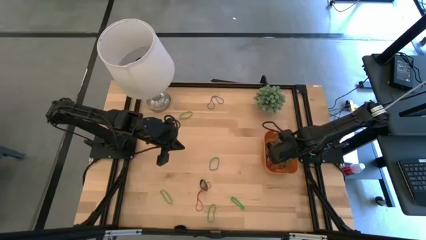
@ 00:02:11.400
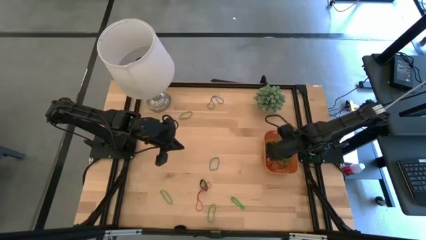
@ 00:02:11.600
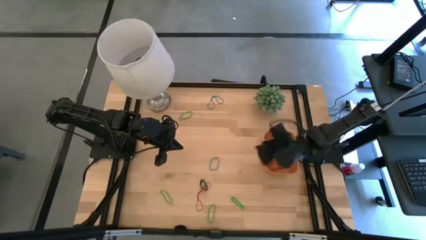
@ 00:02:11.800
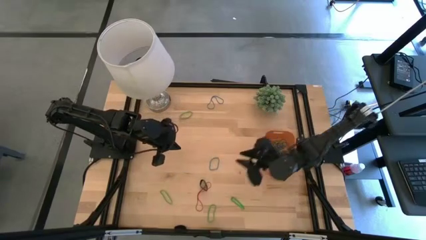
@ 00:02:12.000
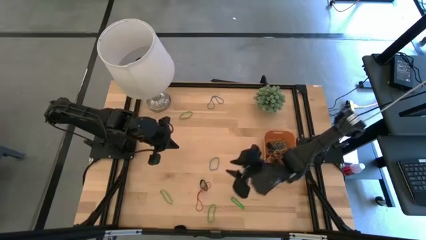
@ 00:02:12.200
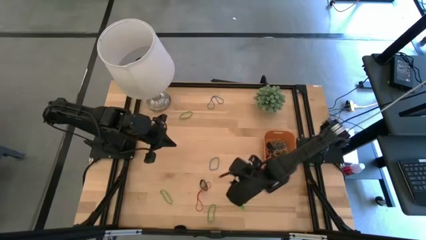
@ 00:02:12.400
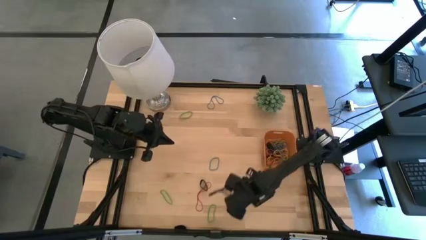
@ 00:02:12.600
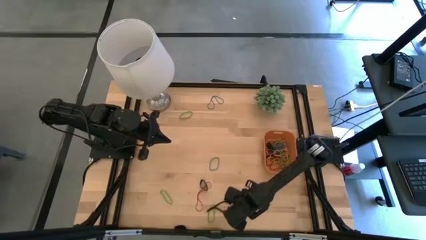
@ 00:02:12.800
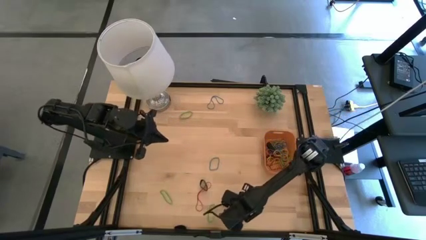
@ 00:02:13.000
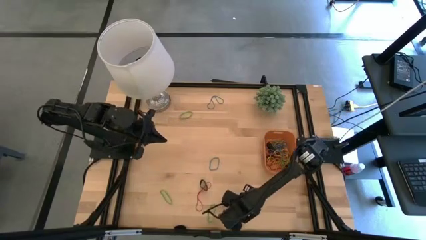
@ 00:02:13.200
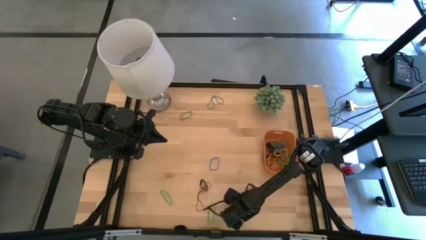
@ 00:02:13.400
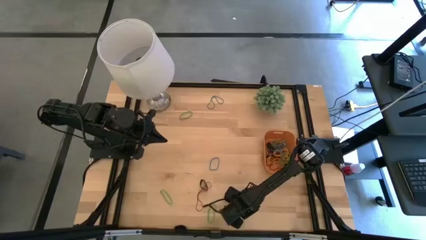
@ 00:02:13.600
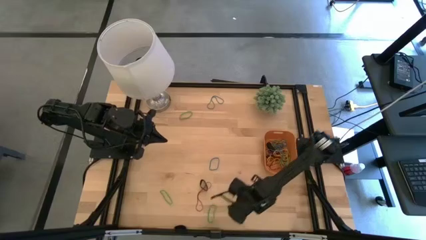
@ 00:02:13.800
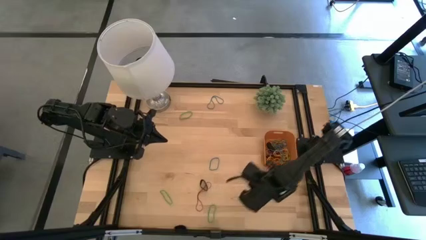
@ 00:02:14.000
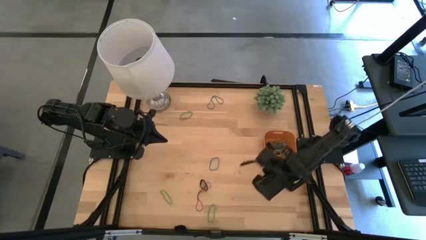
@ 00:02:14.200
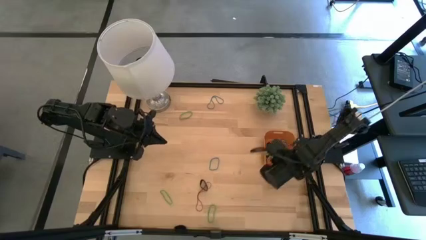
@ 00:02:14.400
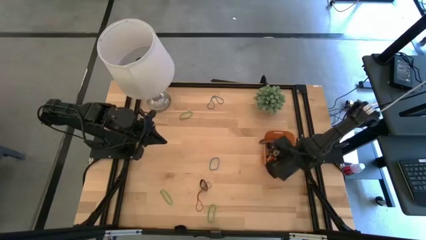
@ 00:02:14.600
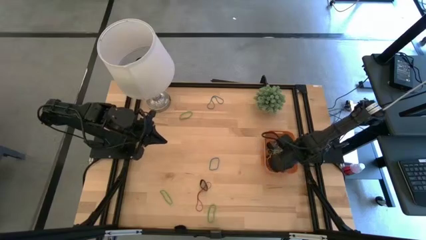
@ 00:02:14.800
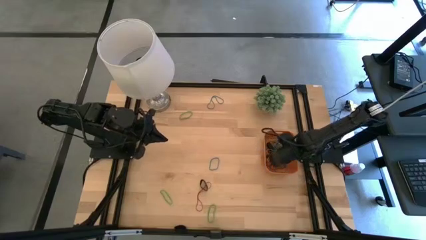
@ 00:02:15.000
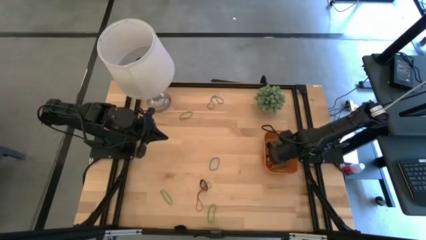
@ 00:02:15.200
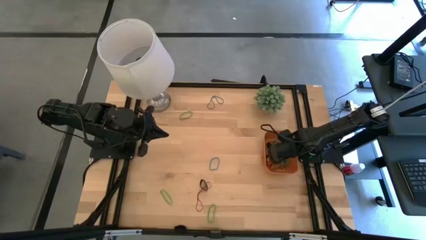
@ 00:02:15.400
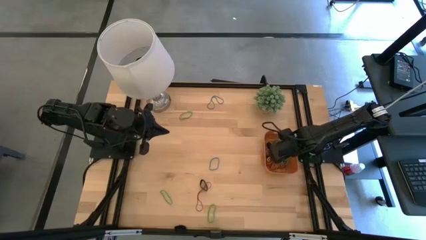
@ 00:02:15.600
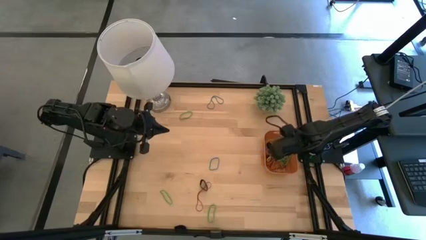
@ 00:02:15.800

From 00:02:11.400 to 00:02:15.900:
Task: Pick and place rubber bands into bin
Put the green rubber band into the orange bin

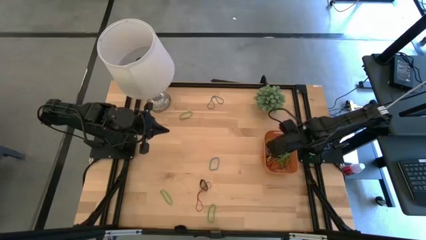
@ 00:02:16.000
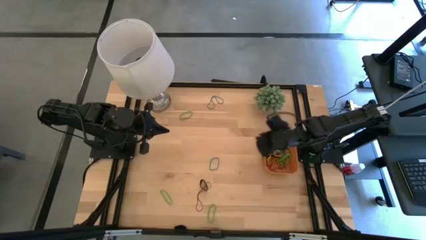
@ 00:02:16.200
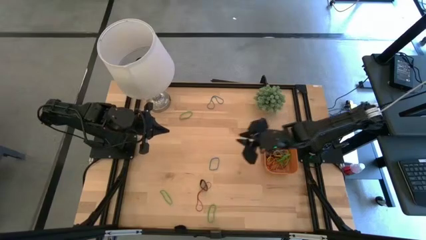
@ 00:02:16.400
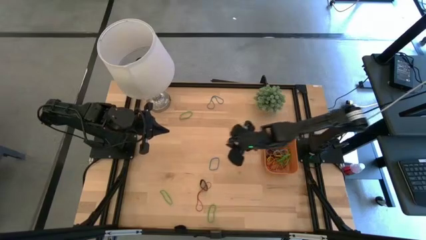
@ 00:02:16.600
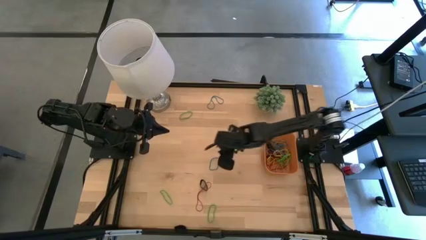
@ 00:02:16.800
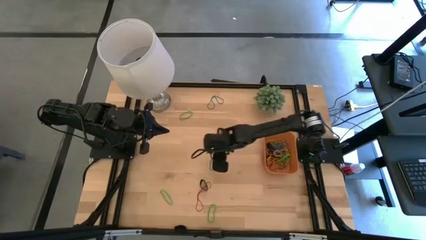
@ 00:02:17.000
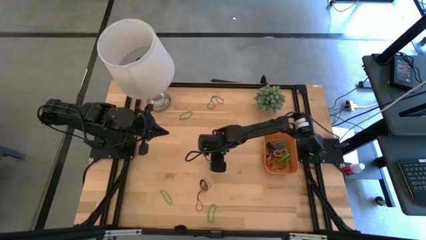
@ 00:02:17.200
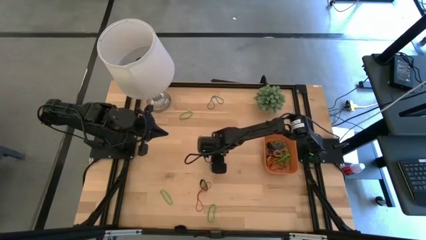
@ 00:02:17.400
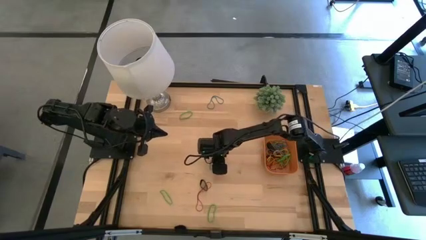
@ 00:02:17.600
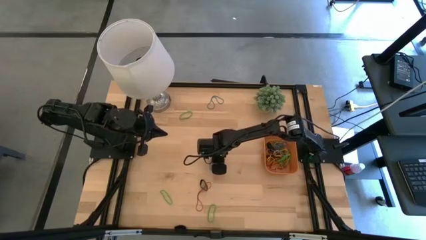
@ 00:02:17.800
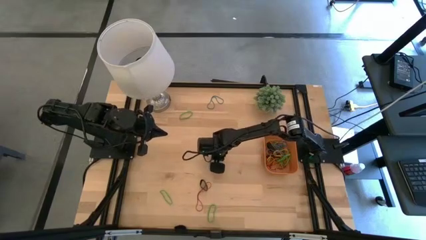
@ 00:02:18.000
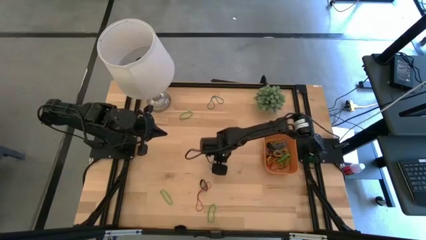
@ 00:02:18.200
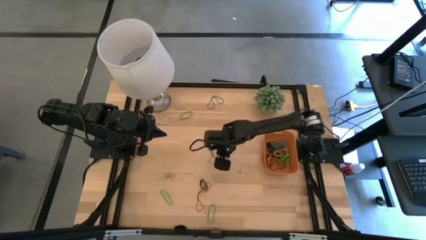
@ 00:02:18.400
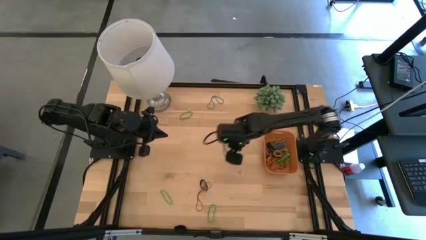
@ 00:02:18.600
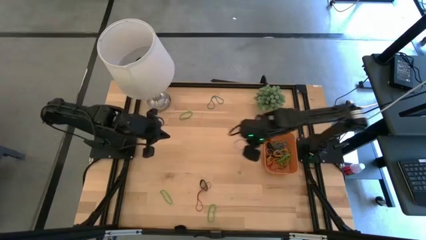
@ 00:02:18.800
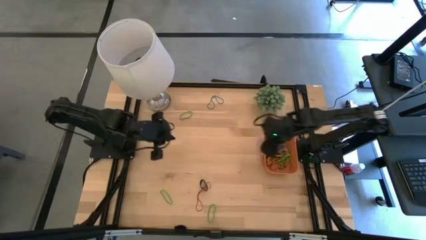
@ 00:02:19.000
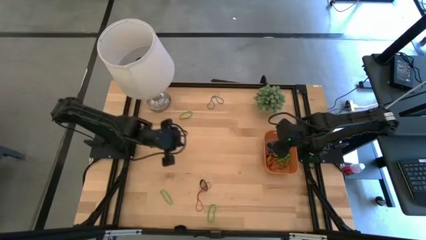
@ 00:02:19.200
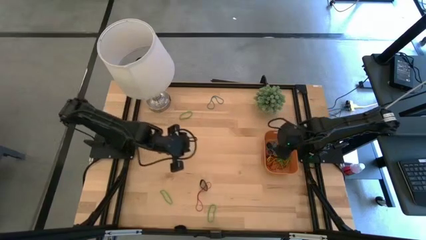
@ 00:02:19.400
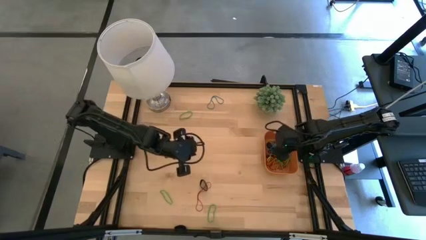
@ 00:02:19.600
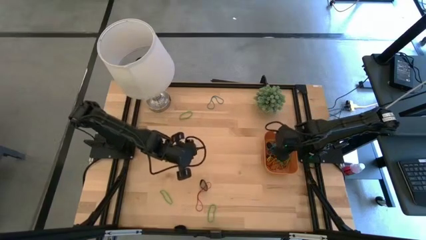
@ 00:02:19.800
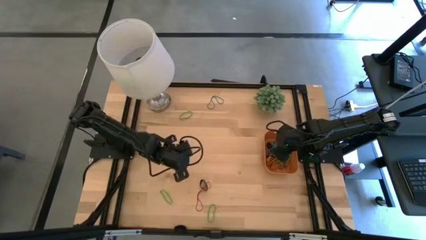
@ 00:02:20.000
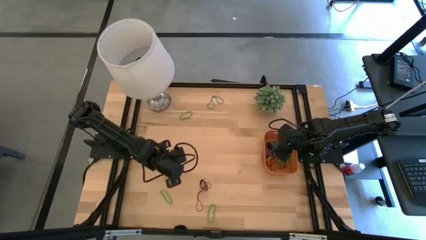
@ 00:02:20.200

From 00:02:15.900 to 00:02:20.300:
Put the blue rubber band into the orange bin

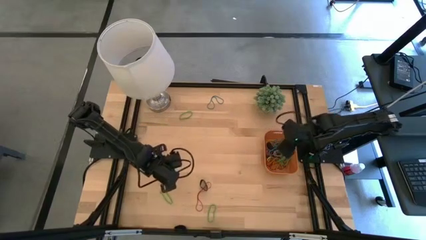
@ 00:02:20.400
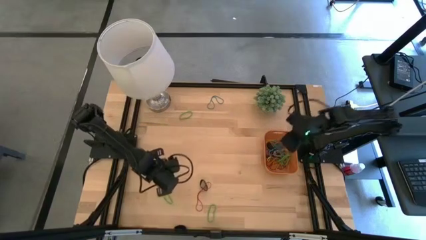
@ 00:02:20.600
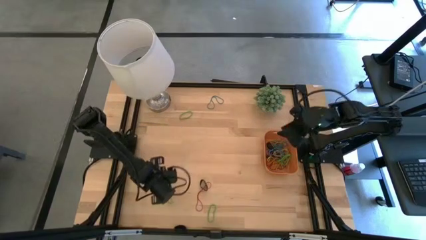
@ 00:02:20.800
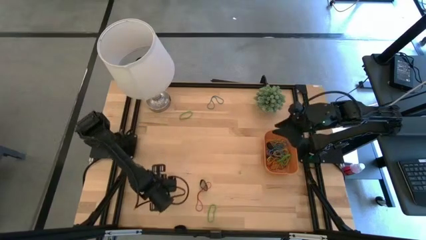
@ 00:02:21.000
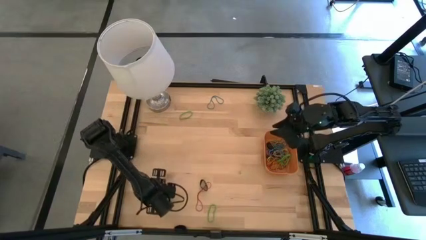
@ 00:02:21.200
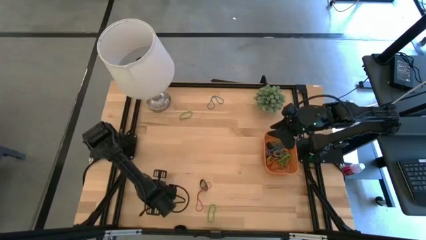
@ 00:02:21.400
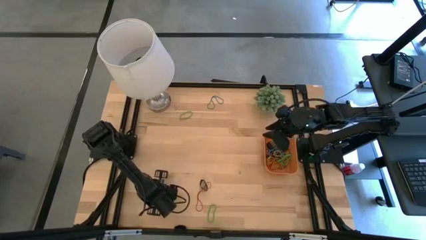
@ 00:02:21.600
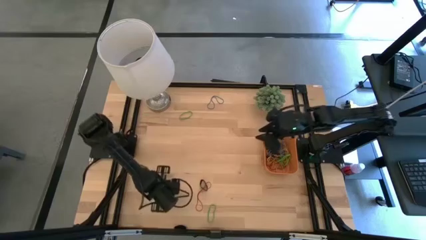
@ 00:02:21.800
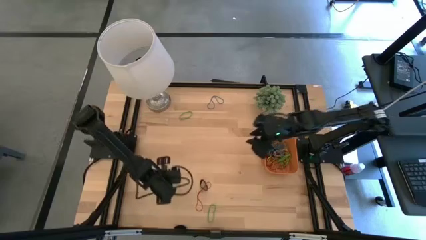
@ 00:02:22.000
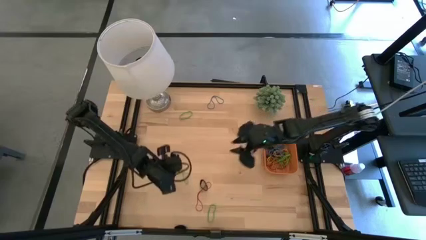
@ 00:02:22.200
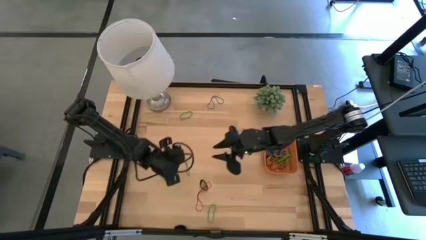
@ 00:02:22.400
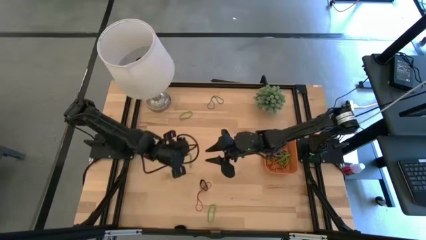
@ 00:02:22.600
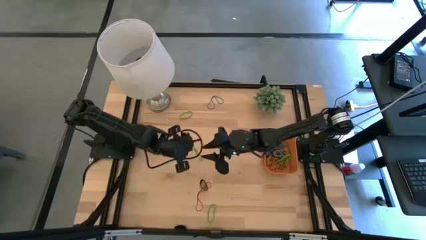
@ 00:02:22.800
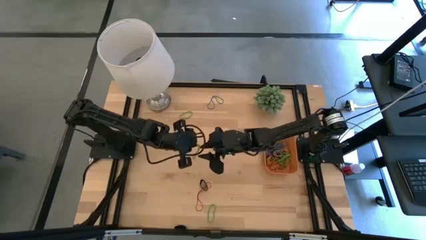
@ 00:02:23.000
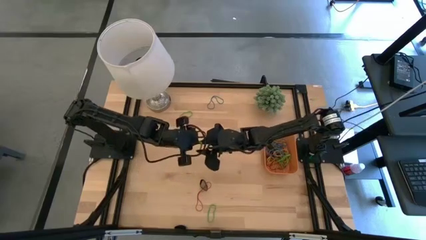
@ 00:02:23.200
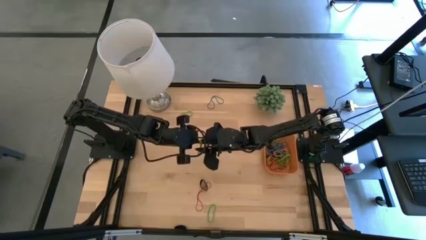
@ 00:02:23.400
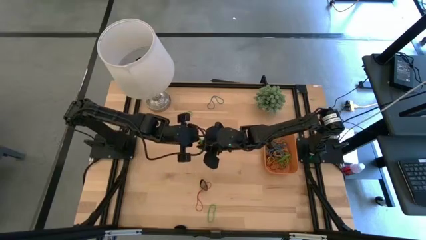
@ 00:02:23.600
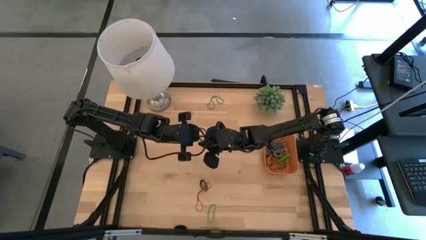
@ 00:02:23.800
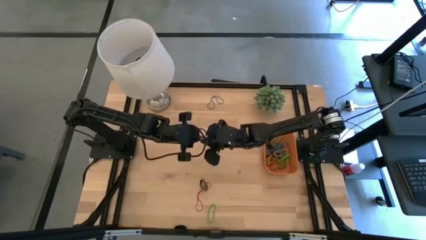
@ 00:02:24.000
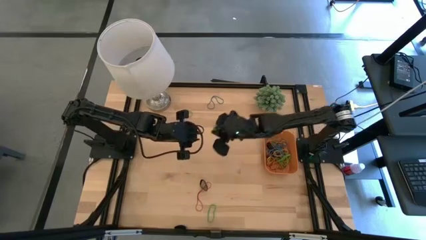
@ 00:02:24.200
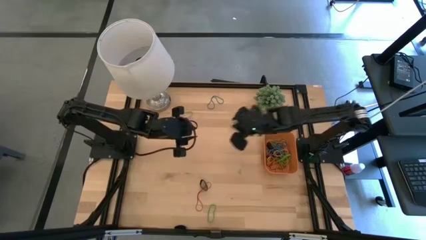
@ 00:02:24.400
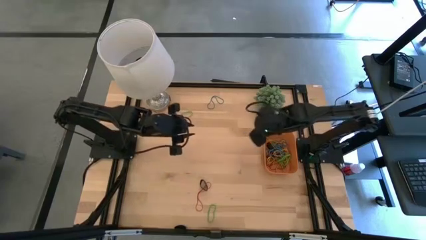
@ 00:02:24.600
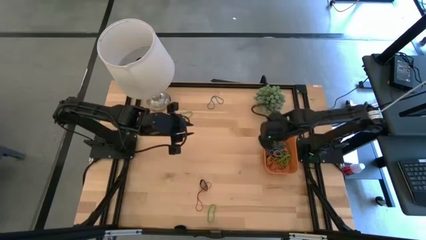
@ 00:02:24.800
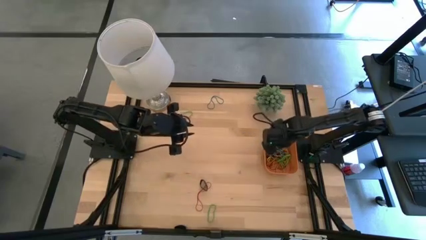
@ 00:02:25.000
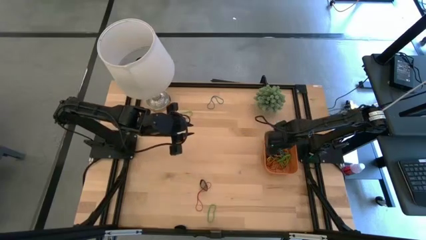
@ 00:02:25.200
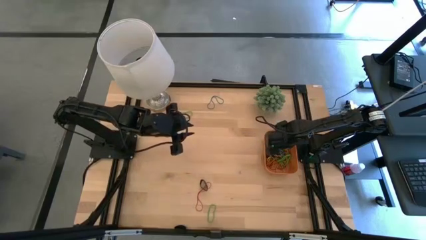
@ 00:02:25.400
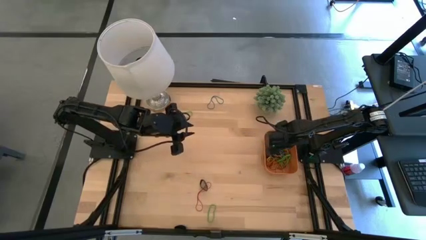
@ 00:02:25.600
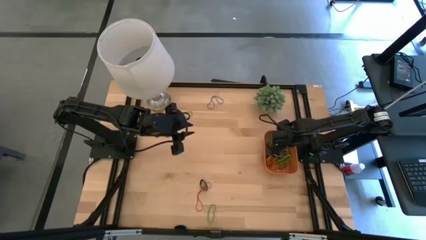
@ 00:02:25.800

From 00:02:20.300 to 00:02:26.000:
Put the green rubber band into the orange bin

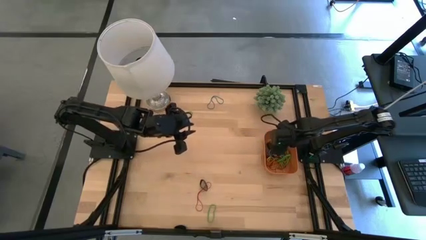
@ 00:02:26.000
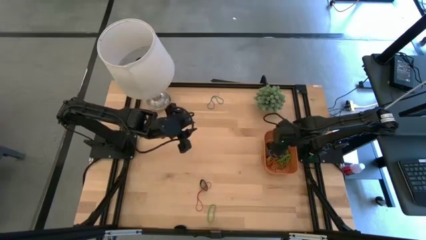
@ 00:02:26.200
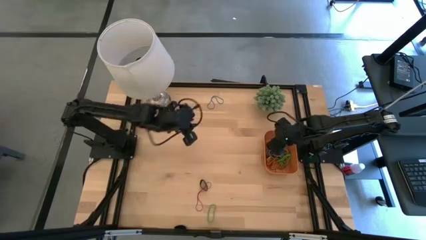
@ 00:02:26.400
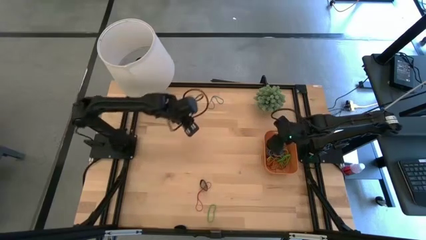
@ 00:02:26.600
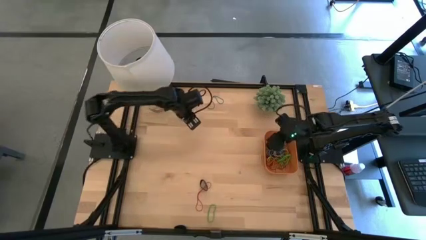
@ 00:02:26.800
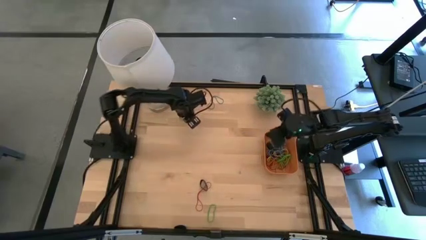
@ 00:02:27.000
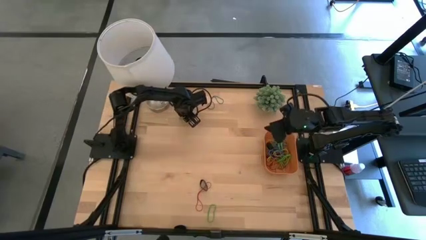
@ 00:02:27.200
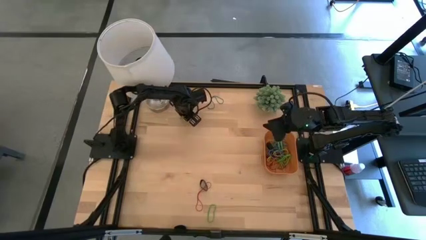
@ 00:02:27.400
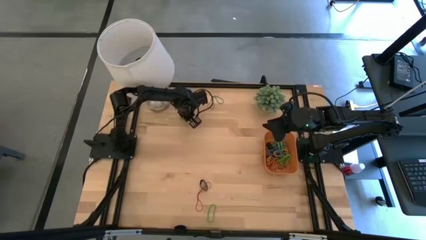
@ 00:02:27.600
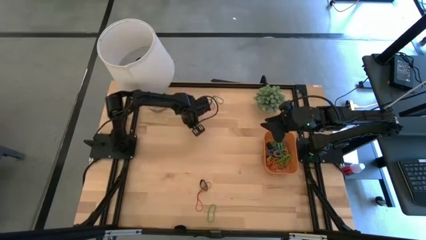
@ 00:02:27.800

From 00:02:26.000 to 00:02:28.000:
Put the green rubber band into the orange bin
